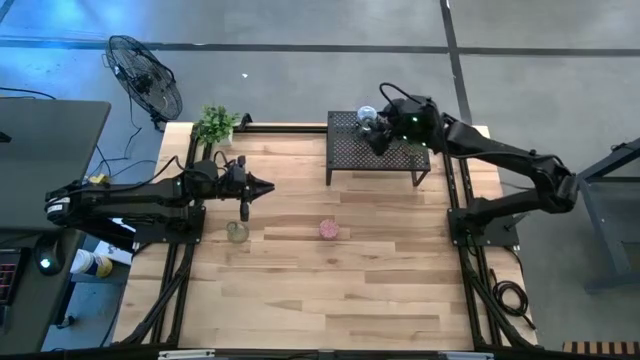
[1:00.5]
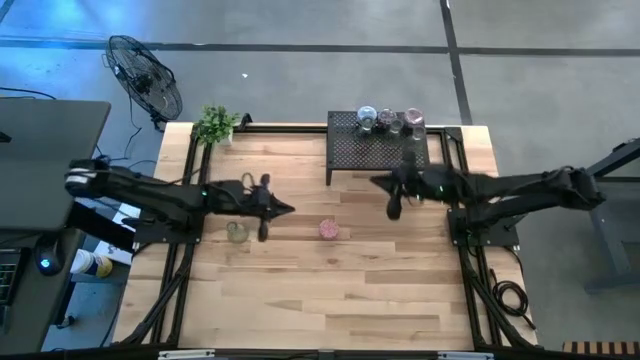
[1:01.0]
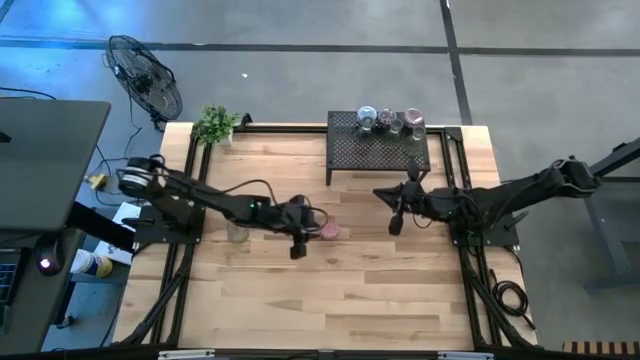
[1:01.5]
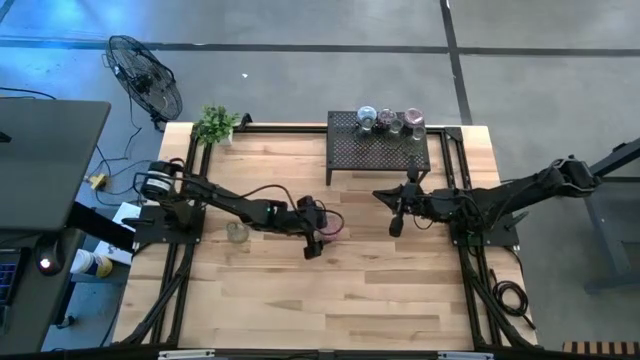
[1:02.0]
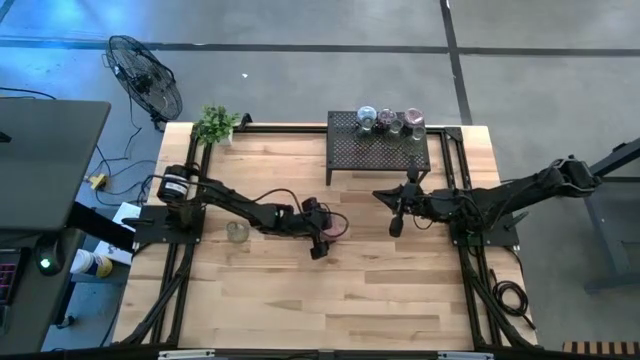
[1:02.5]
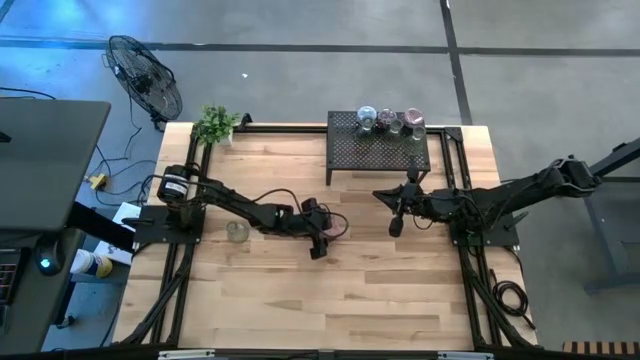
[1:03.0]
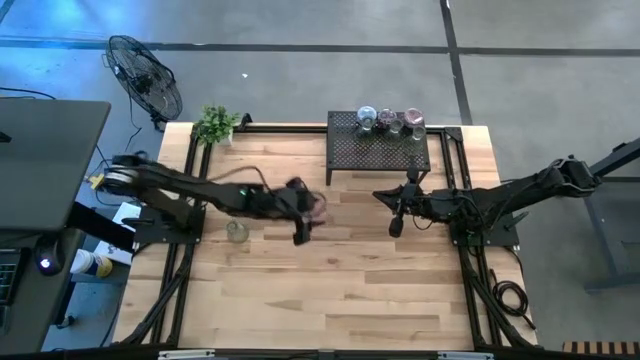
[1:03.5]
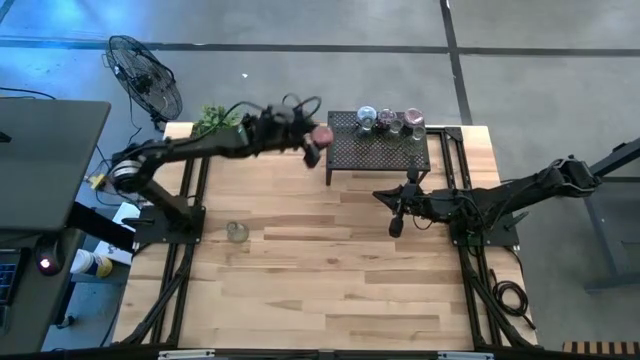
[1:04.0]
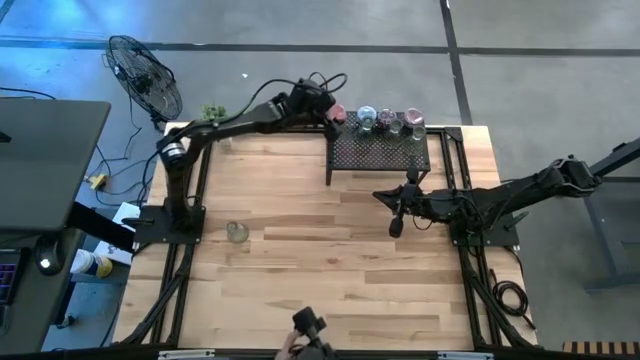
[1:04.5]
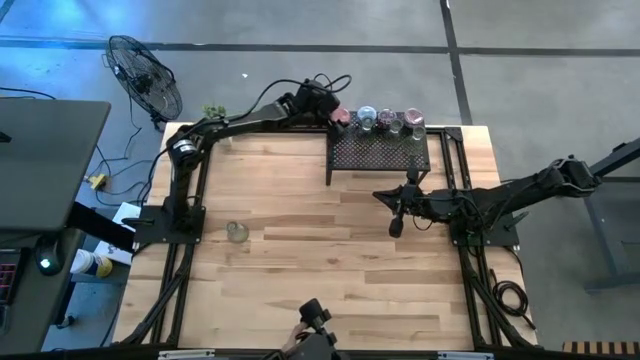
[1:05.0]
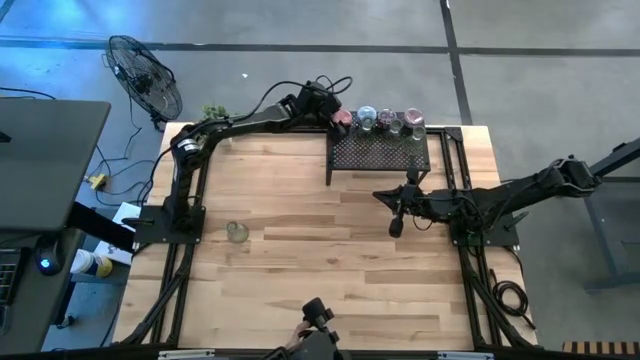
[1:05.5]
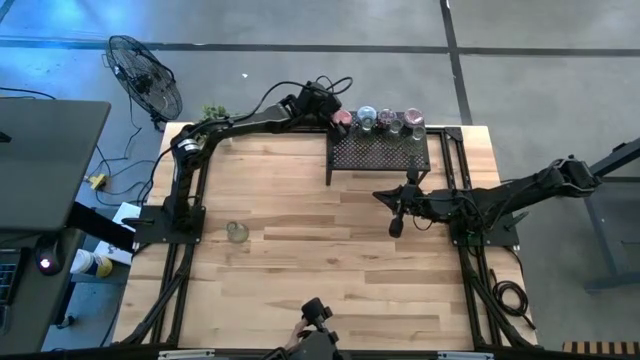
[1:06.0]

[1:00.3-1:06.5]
Task: Pick & Place candle stick holders
Put the pink scented candle on the shelf

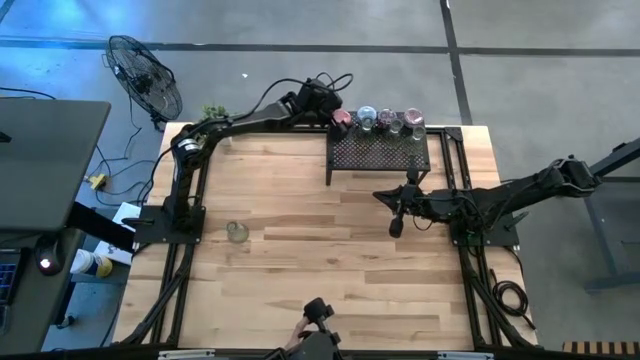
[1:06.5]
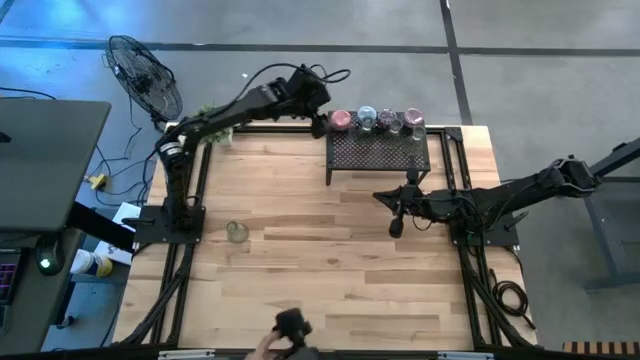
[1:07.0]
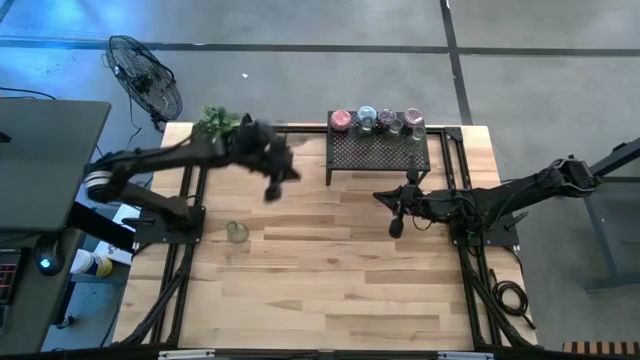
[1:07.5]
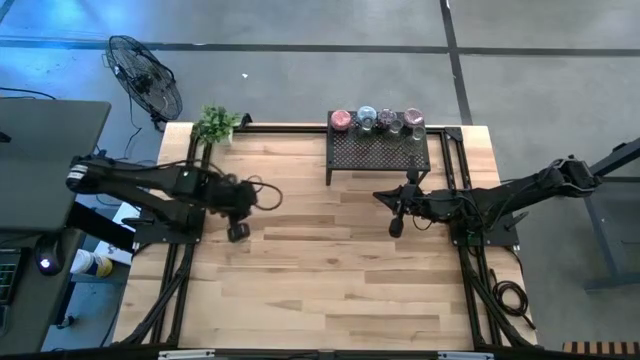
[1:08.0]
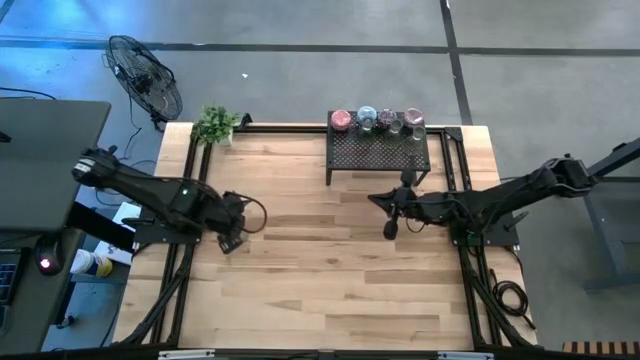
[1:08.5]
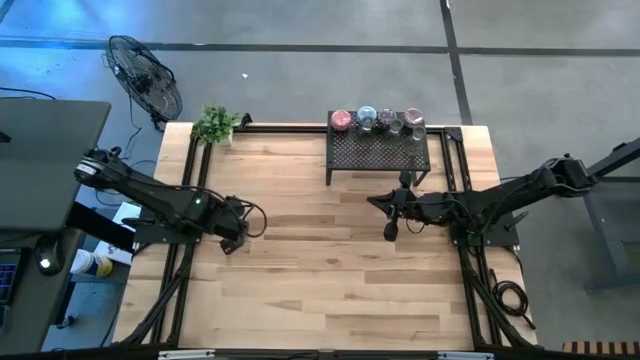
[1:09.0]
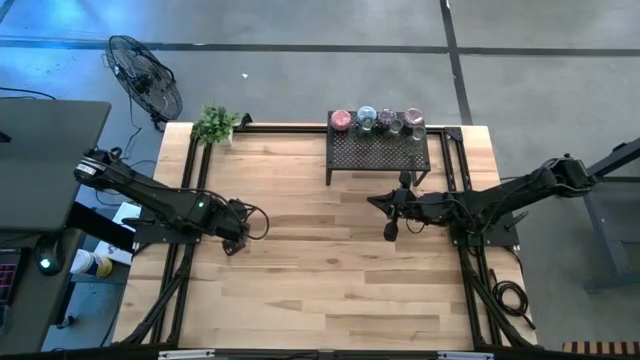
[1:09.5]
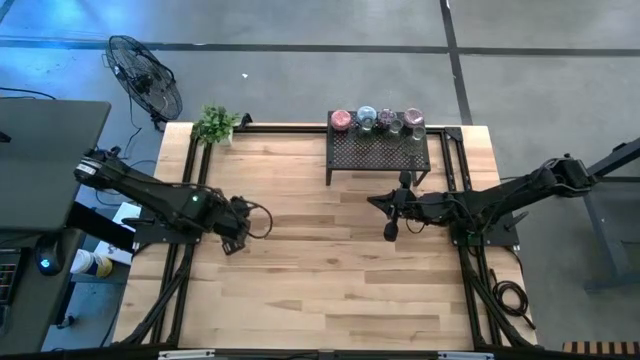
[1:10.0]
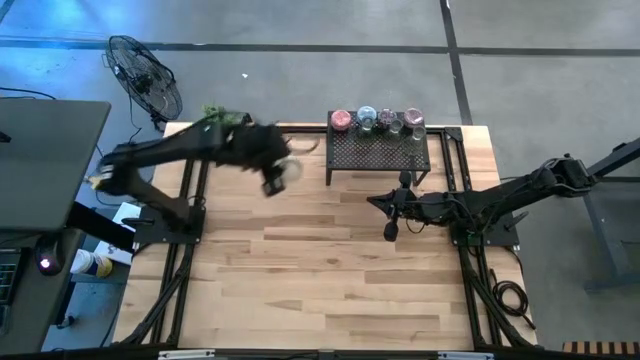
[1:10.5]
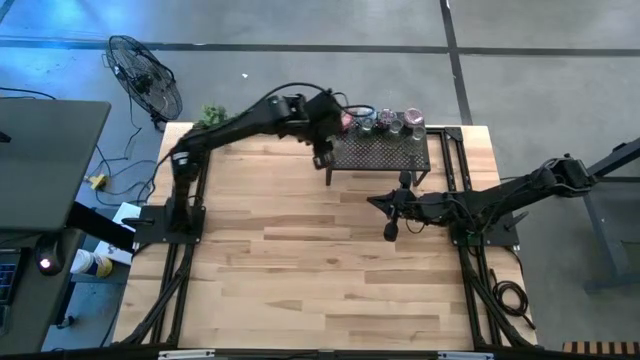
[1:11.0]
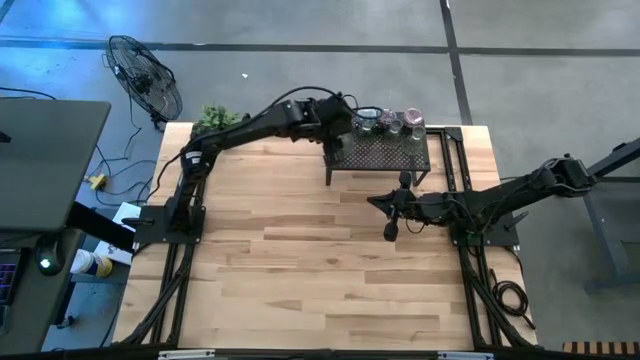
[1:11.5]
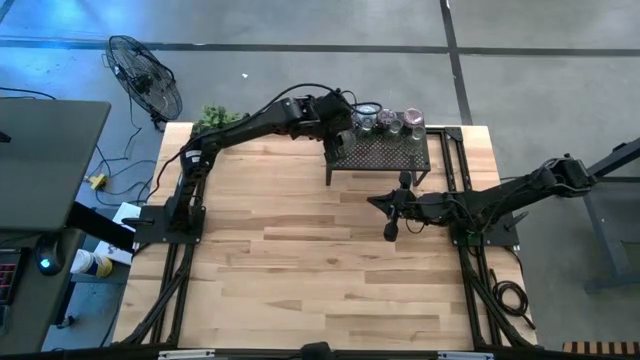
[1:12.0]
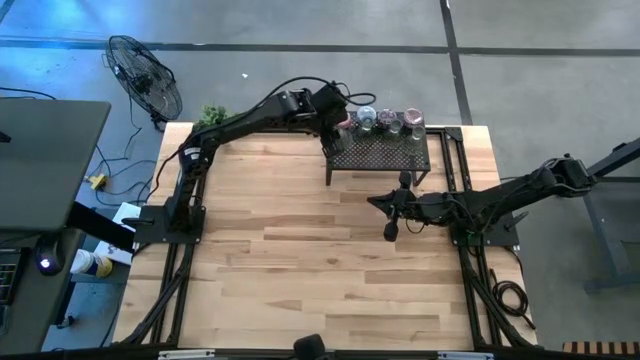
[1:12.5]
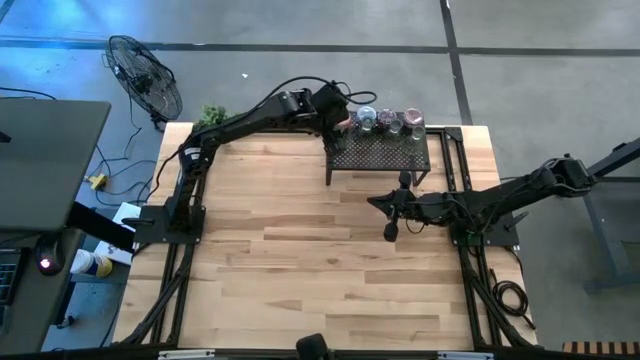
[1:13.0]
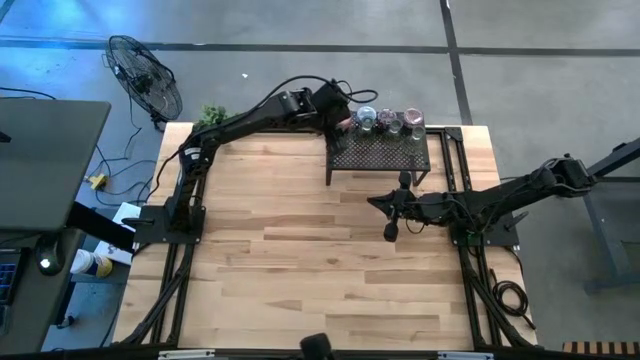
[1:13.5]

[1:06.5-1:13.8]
Put the green glass candle holder on the shelf

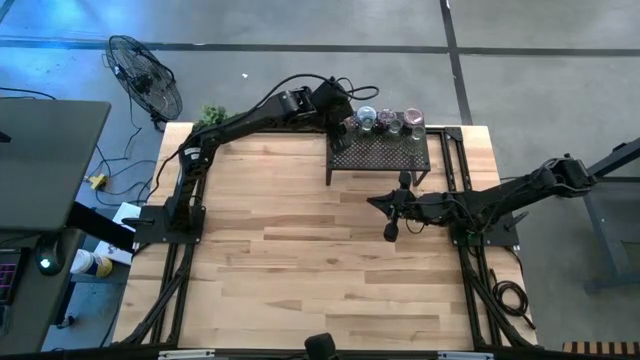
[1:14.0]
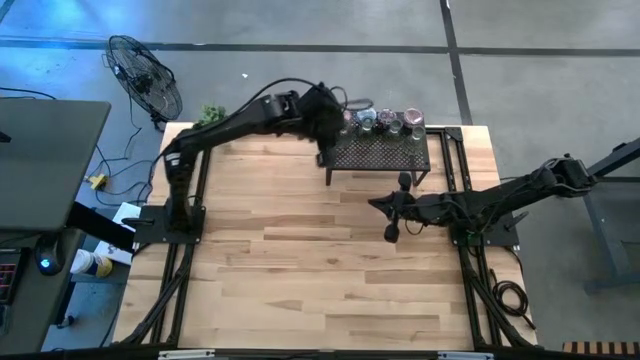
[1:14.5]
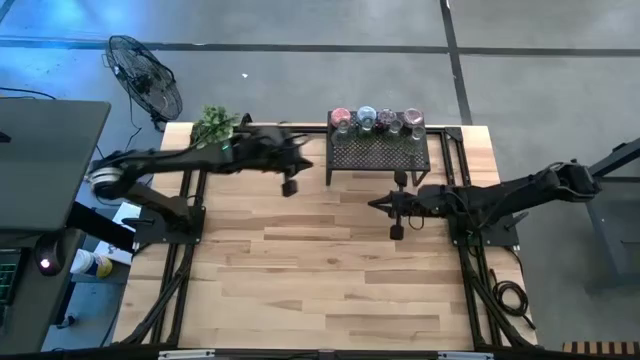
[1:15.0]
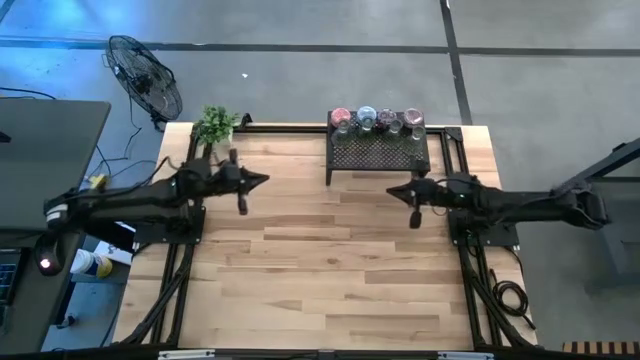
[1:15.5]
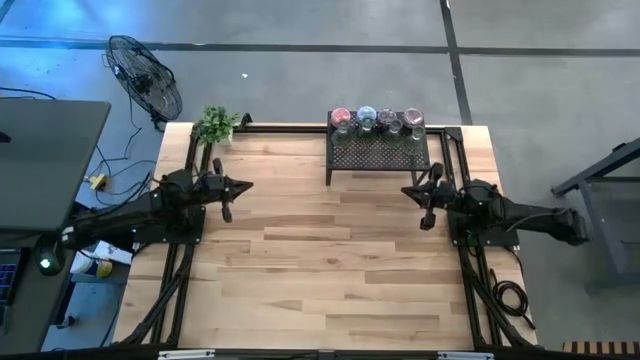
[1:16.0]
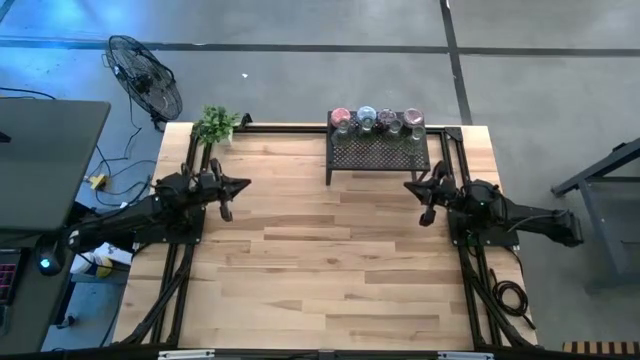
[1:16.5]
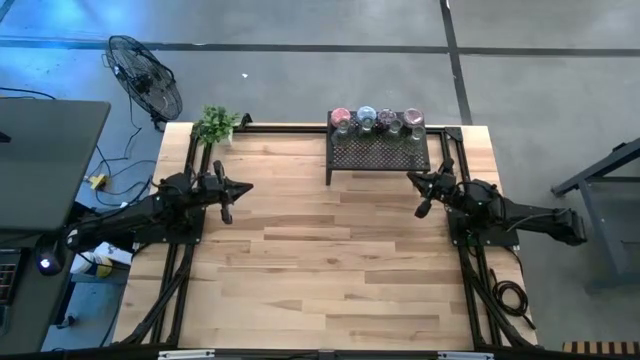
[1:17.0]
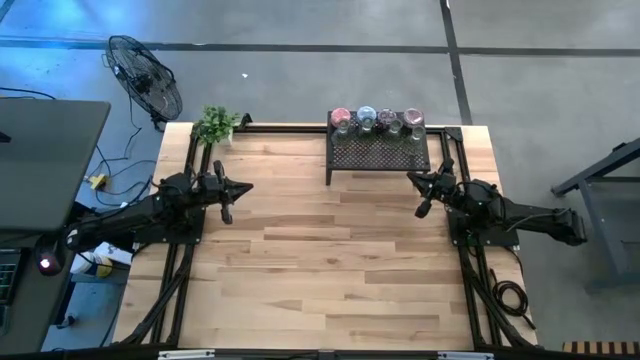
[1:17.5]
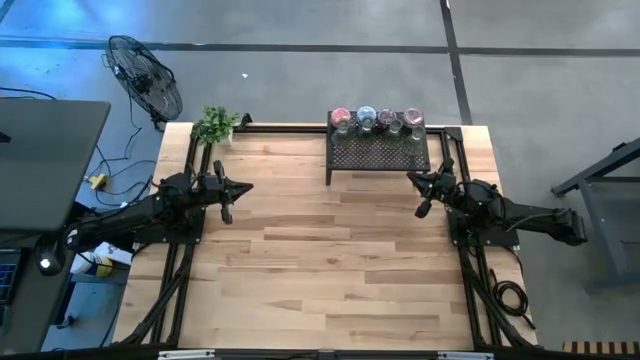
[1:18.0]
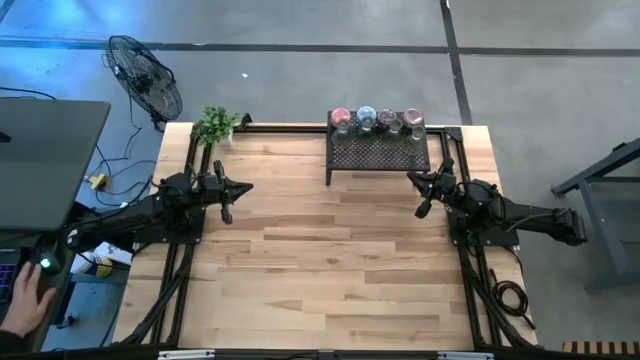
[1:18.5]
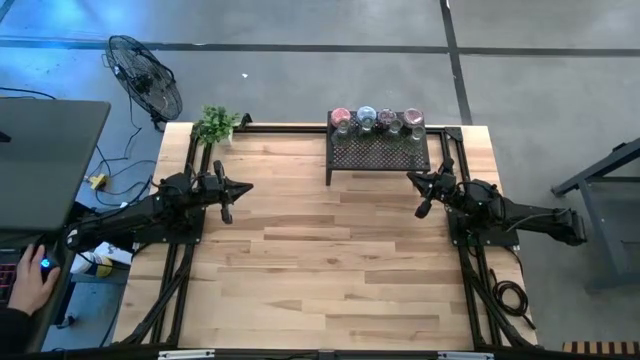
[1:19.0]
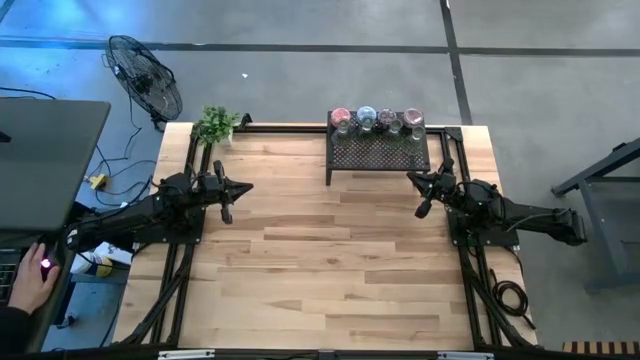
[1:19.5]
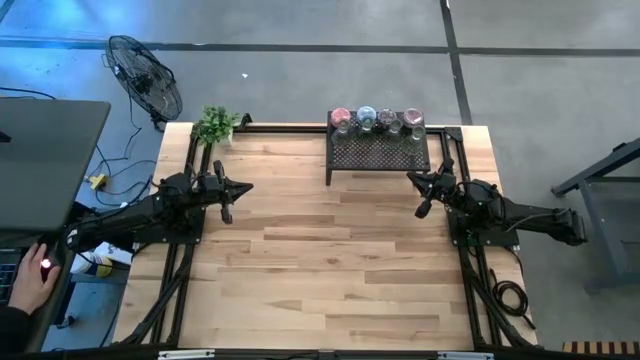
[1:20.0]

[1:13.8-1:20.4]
Return to Home Position
